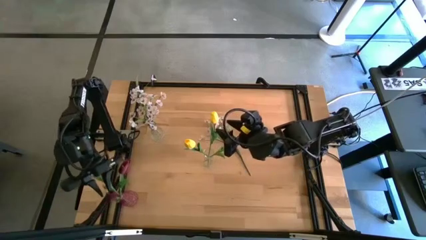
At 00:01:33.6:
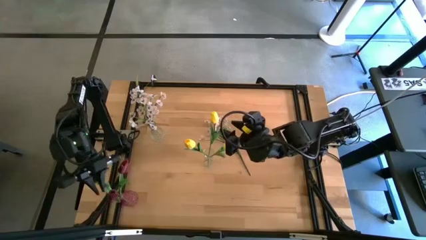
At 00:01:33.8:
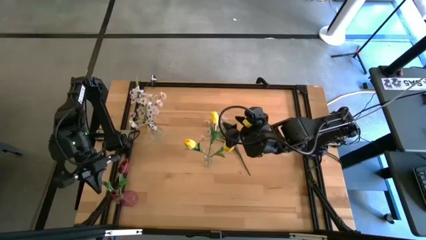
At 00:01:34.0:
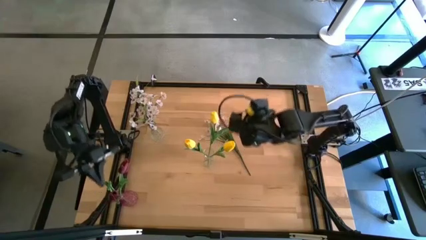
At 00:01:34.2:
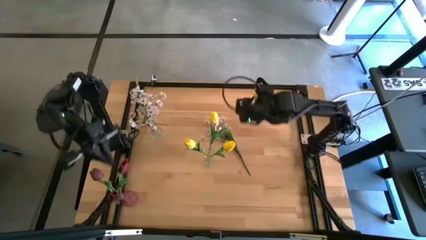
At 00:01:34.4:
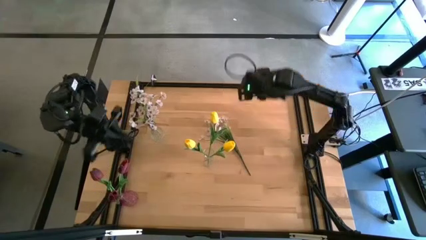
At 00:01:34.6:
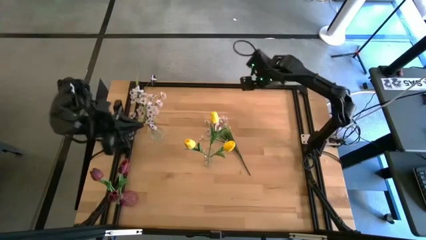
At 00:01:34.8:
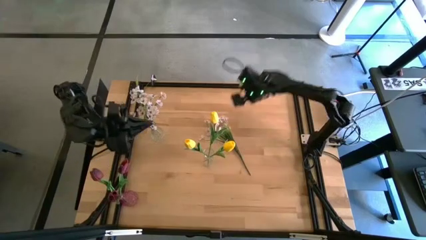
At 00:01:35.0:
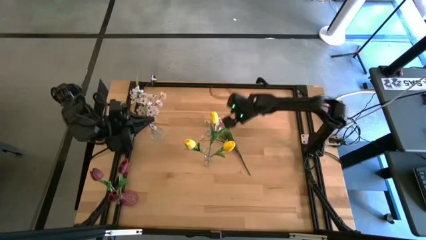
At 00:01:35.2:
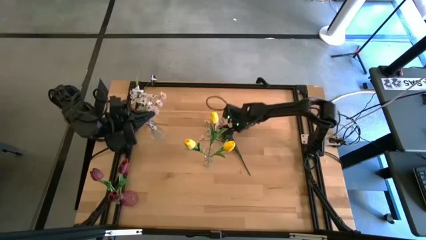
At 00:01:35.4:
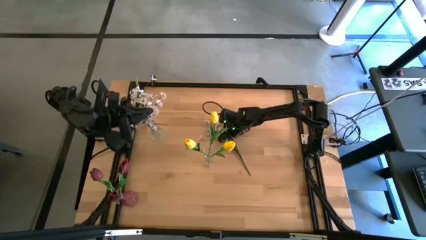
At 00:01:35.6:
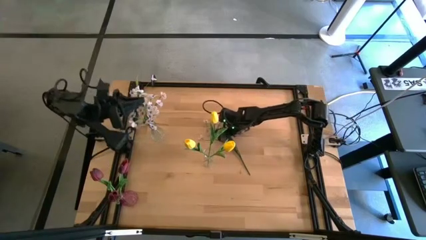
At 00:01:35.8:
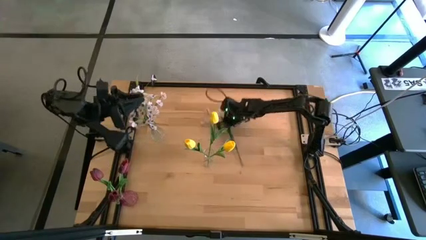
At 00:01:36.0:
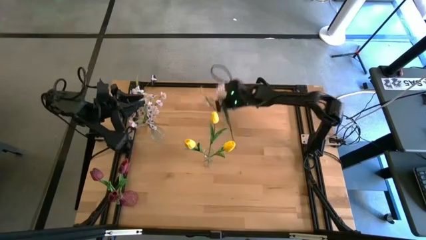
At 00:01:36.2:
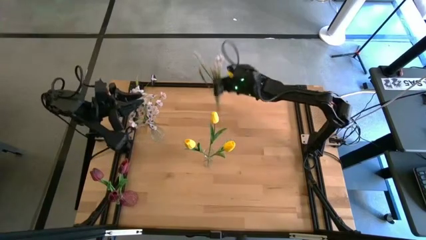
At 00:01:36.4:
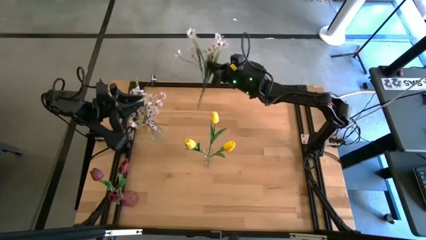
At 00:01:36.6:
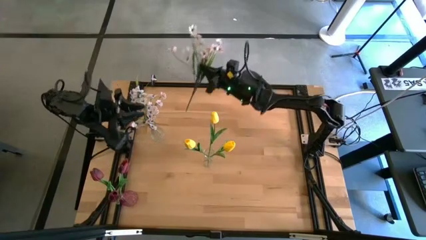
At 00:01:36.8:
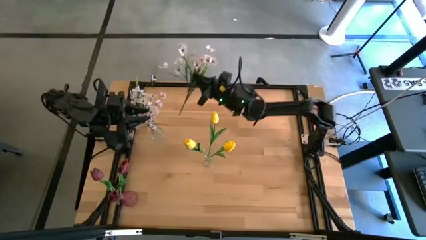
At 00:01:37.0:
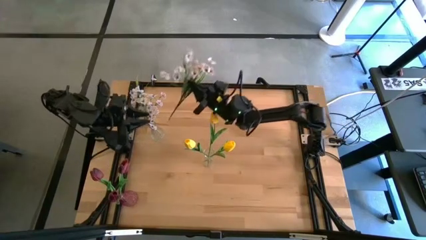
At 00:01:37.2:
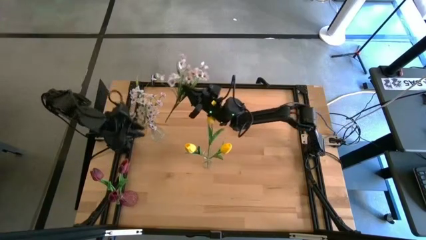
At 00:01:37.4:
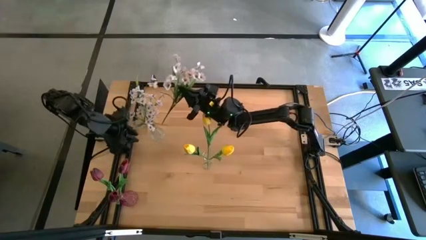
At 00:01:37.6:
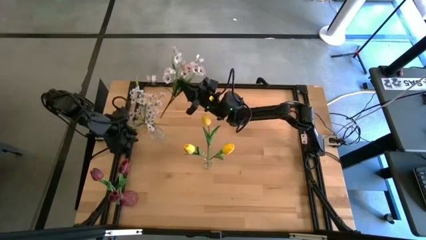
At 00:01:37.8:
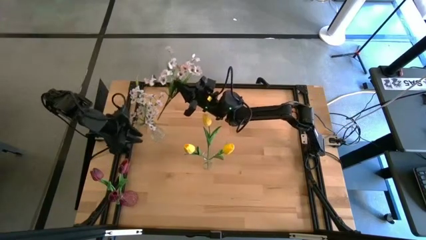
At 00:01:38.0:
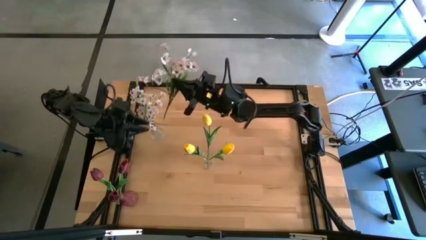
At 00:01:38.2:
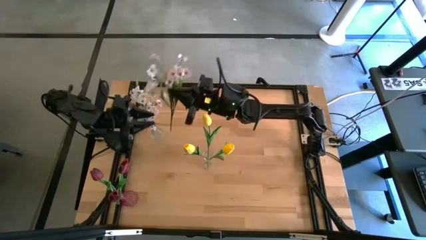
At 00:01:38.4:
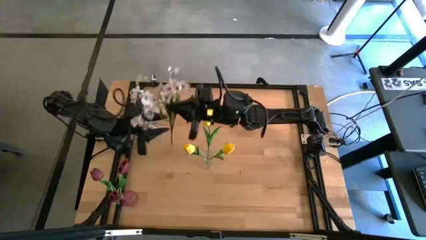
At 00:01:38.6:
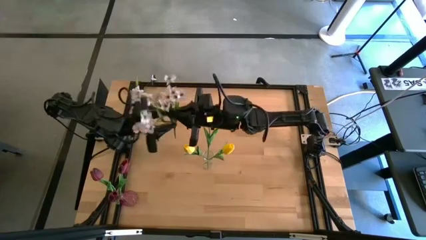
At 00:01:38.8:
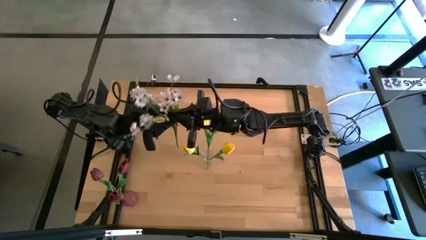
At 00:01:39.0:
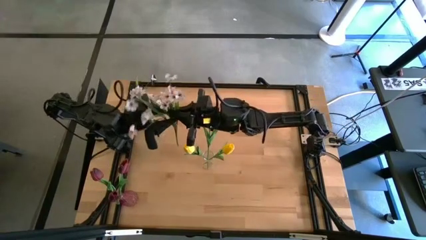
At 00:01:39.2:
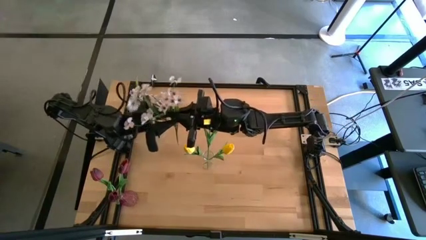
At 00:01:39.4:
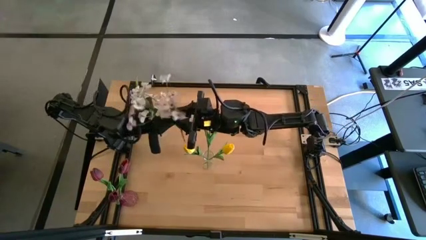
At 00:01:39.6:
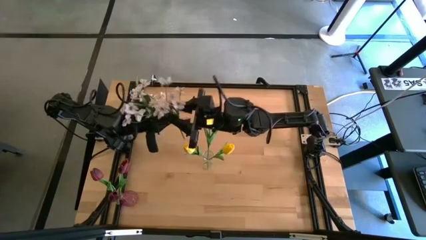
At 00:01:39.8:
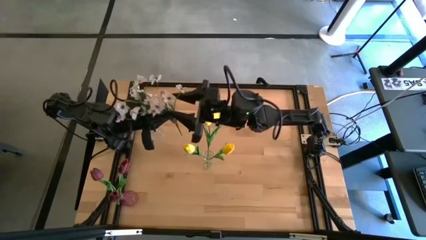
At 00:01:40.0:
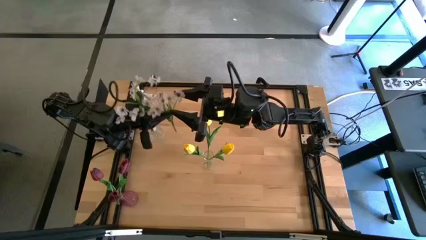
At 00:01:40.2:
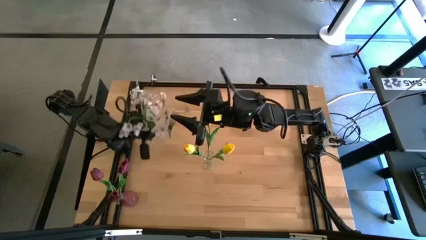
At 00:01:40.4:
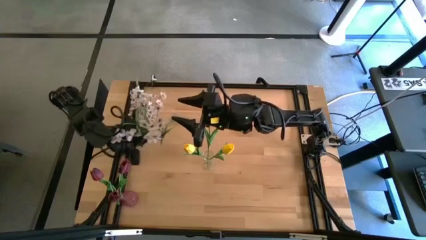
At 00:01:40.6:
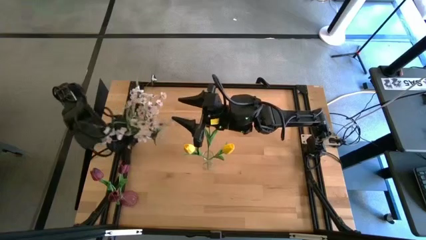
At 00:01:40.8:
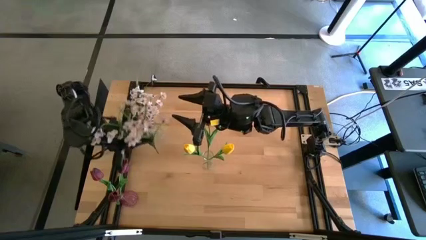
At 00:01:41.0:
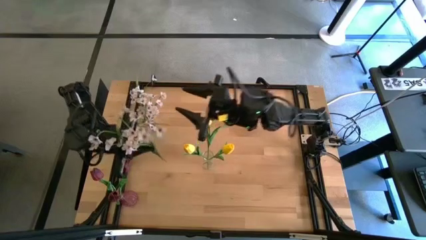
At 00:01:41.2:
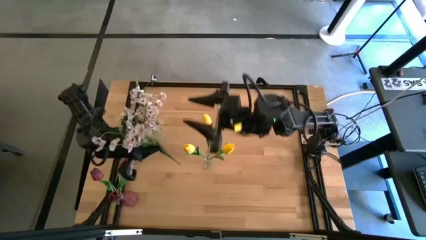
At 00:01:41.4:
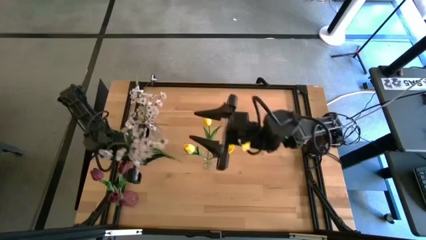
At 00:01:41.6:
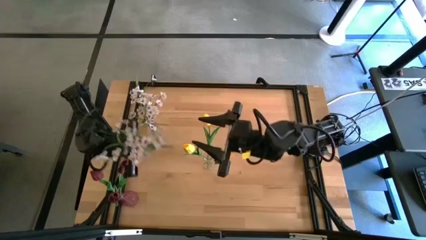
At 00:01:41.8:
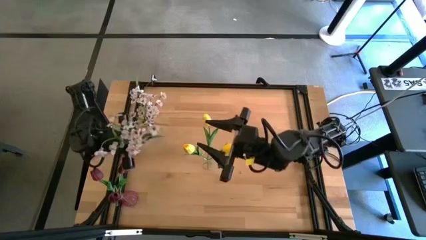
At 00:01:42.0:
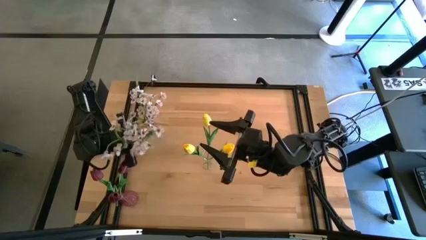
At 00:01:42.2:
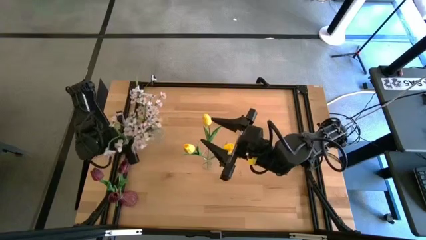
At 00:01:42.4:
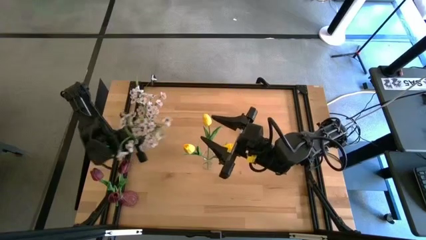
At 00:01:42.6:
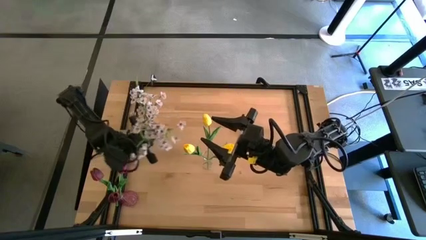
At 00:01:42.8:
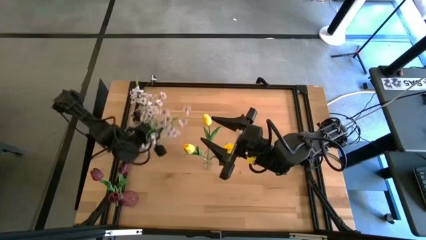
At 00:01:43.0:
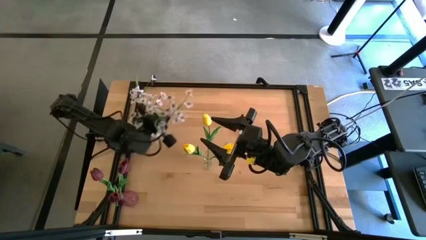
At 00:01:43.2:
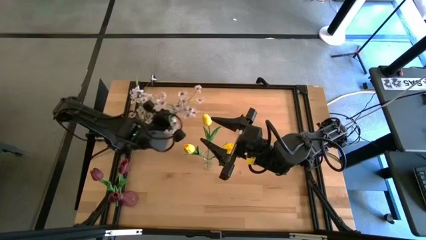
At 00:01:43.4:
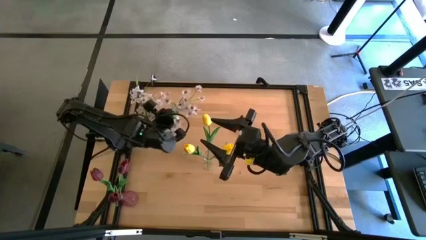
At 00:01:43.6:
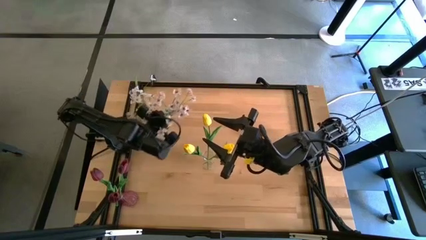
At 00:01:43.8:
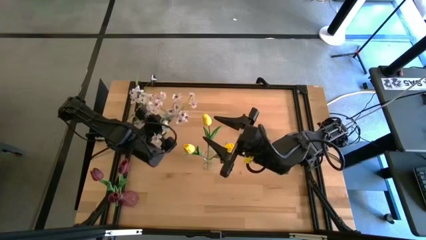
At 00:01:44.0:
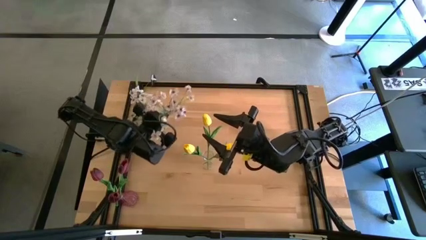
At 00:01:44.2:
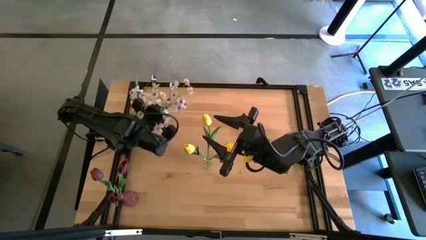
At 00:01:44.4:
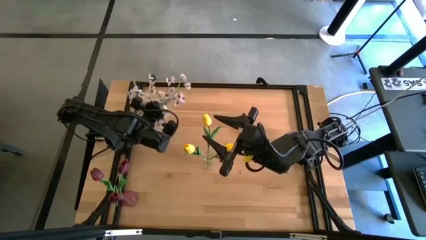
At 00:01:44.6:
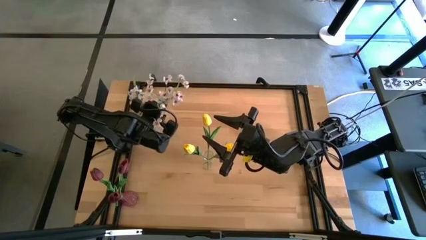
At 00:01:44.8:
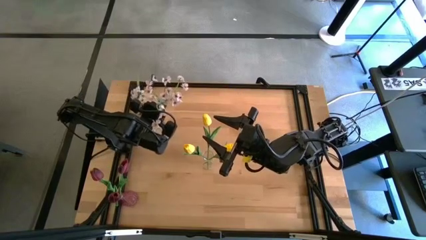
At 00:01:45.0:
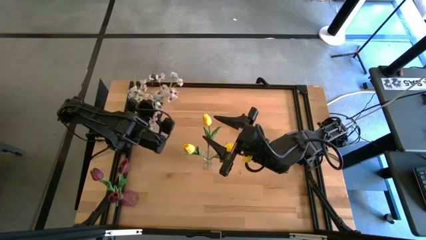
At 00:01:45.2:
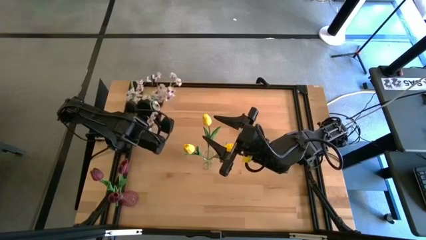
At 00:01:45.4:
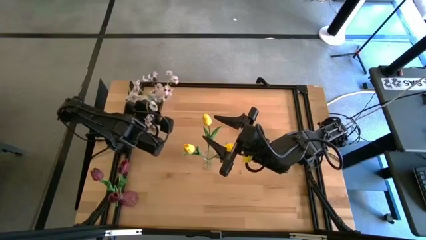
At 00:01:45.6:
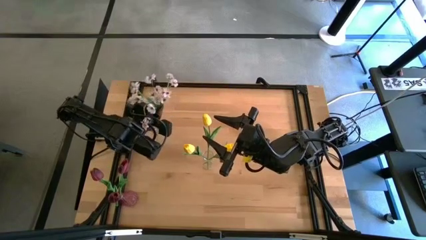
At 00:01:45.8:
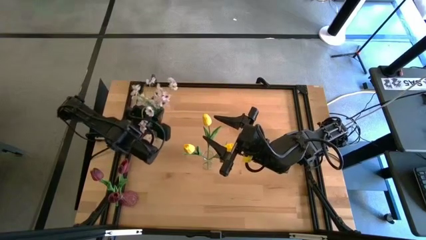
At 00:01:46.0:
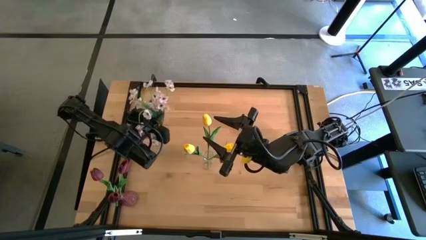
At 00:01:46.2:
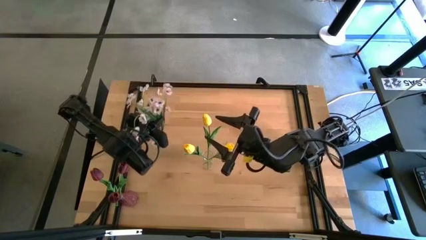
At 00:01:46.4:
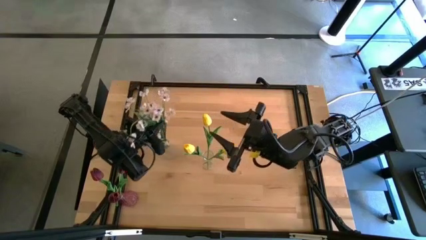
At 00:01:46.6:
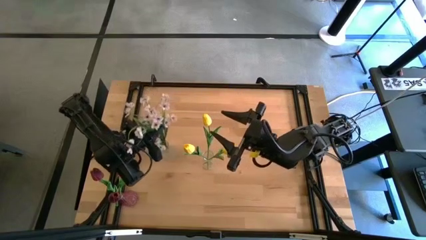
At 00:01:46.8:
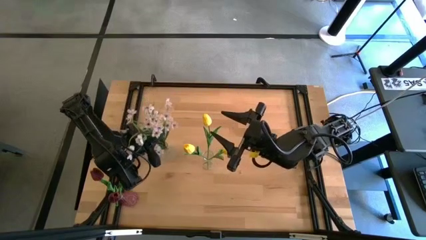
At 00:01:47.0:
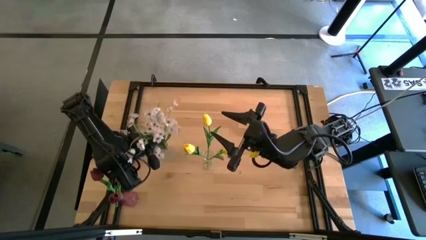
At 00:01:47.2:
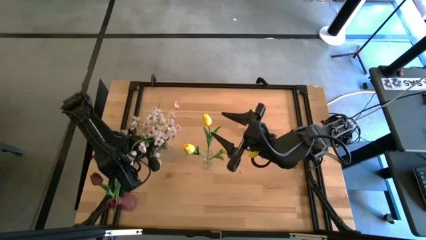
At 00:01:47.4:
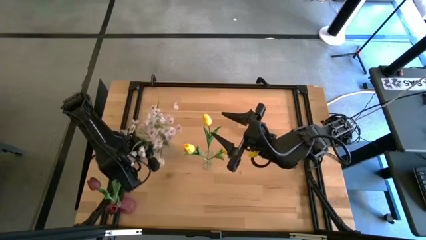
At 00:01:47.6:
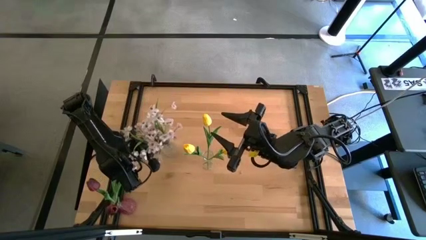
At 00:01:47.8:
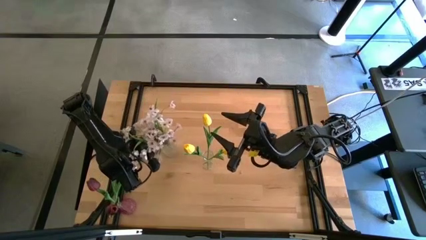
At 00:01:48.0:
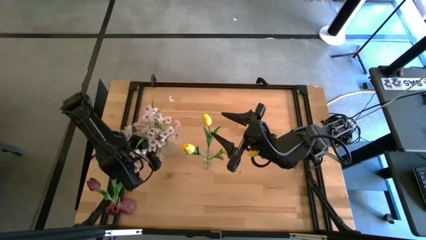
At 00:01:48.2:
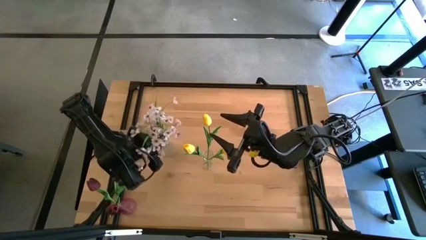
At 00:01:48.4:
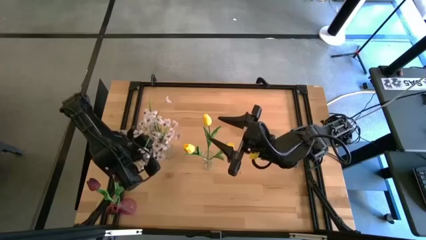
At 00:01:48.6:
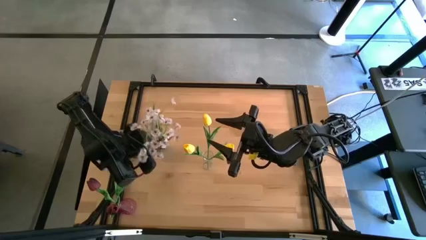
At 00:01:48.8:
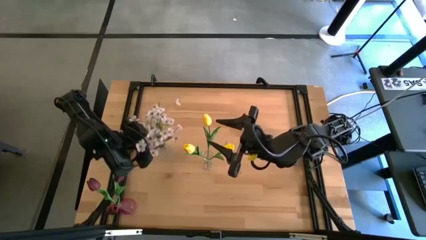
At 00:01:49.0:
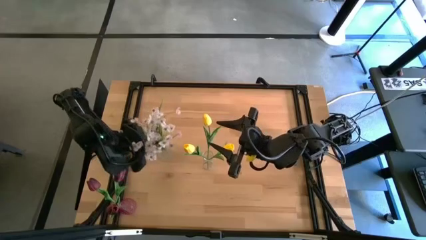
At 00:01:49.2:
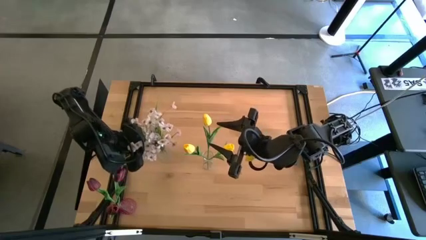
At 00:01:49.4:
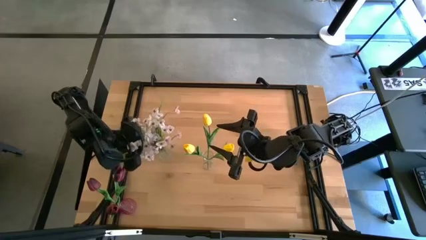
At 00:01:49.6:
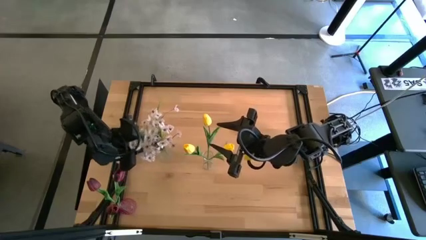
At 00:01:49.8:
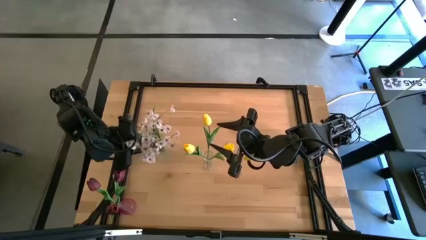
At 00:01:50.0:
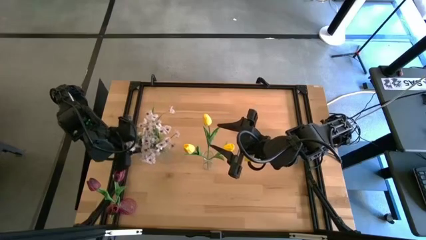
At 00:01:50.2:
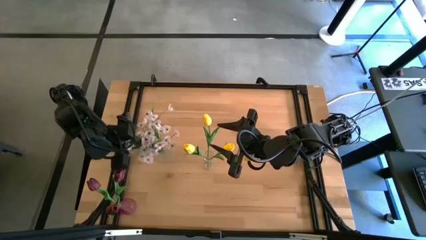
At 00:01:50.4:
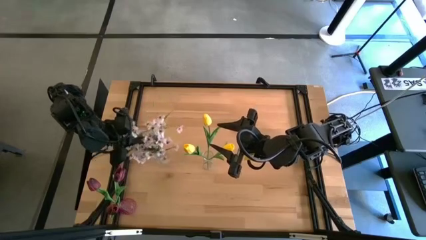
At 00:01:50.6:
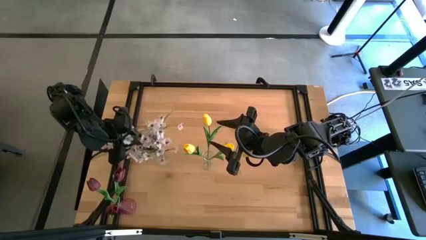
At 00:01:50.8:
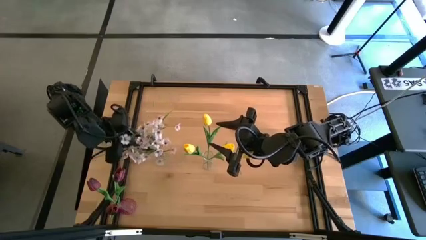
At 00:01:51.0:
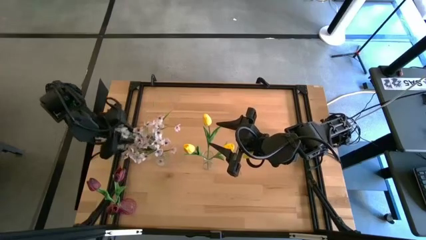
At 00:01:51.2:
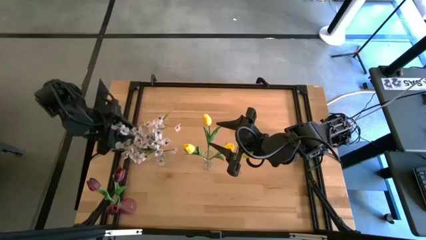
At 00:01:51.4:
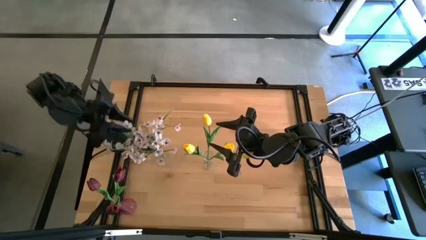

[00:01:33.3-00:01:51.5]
Task: Sort flowers into vase by color
Put the white flowers into the left transparent vase
